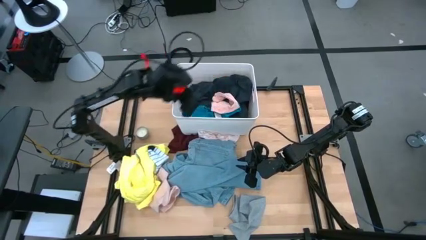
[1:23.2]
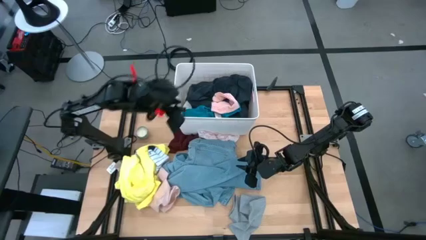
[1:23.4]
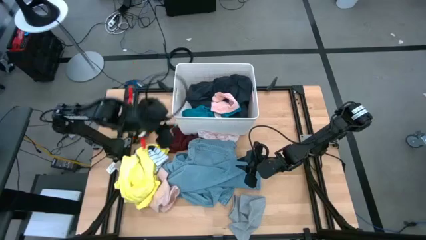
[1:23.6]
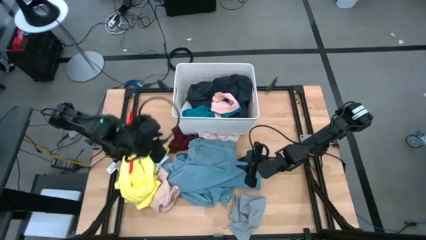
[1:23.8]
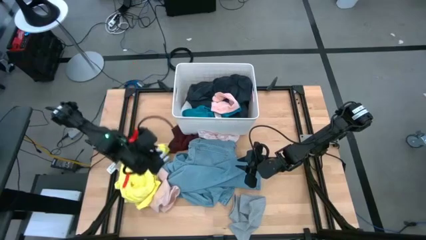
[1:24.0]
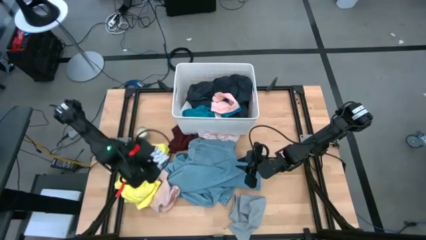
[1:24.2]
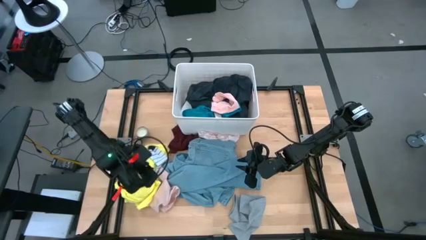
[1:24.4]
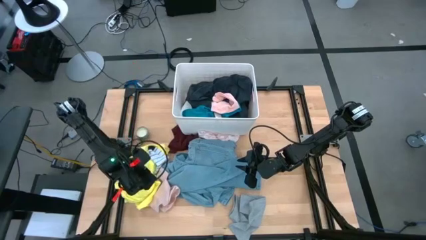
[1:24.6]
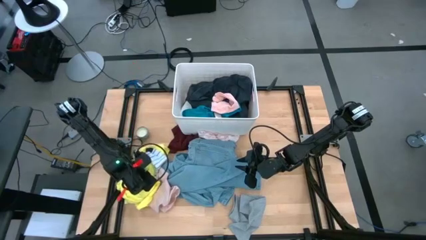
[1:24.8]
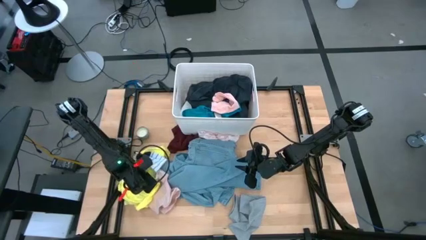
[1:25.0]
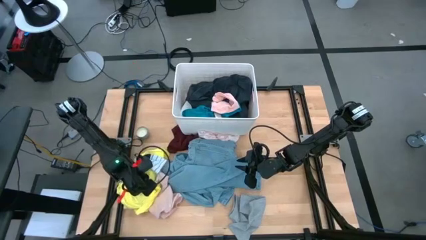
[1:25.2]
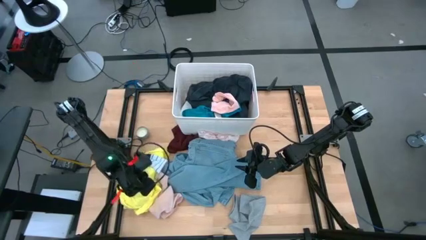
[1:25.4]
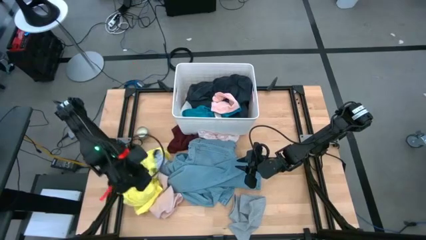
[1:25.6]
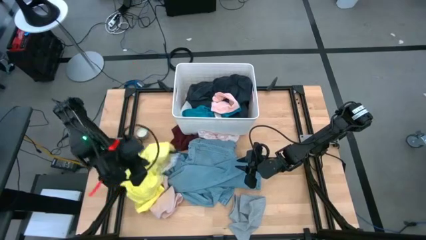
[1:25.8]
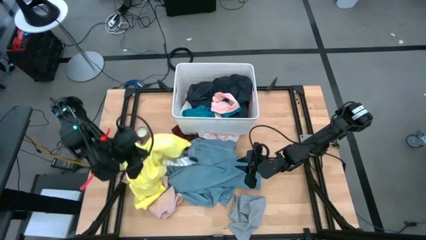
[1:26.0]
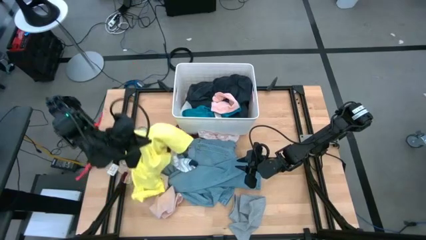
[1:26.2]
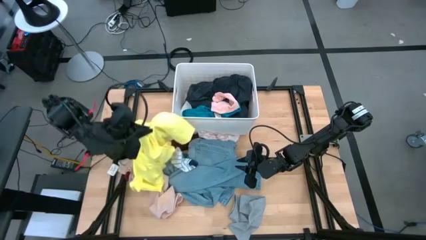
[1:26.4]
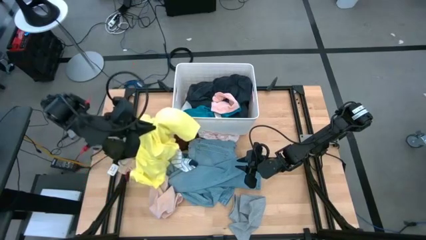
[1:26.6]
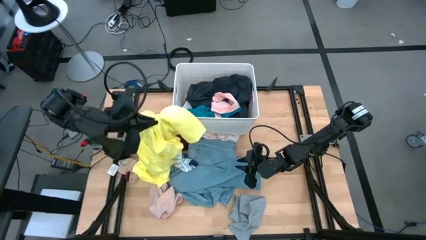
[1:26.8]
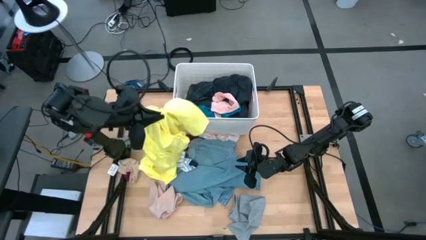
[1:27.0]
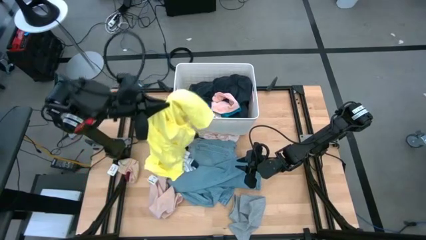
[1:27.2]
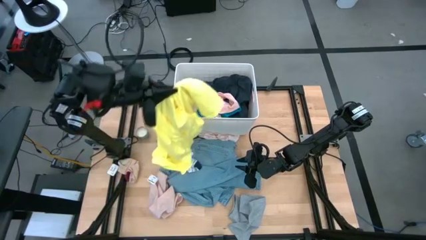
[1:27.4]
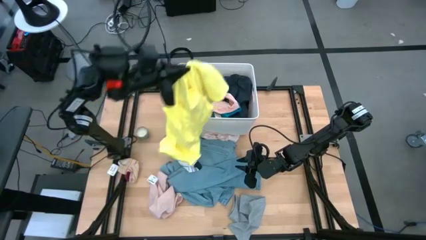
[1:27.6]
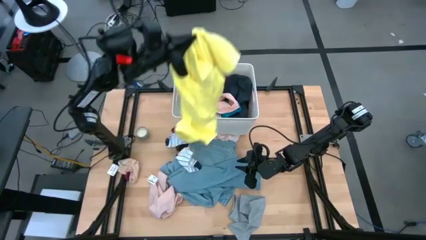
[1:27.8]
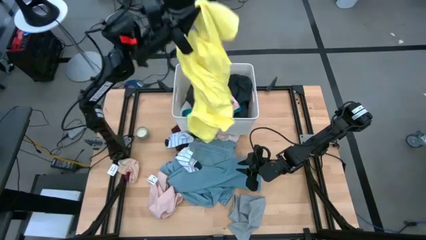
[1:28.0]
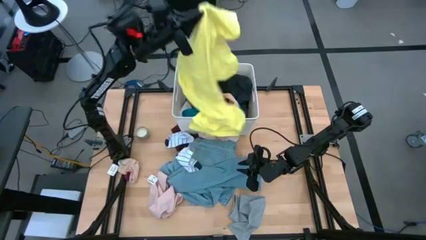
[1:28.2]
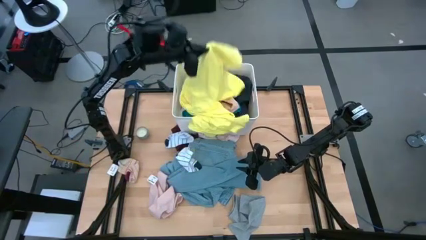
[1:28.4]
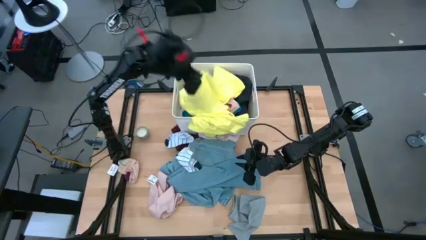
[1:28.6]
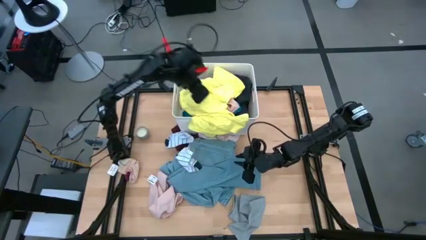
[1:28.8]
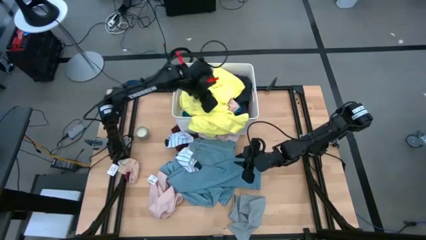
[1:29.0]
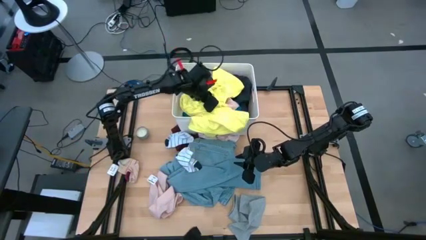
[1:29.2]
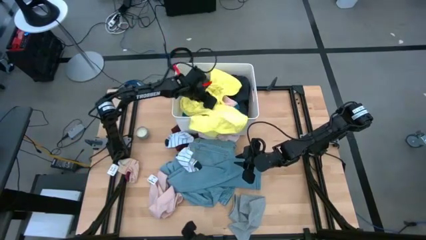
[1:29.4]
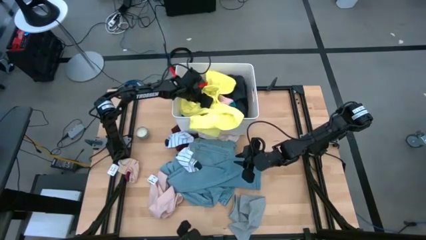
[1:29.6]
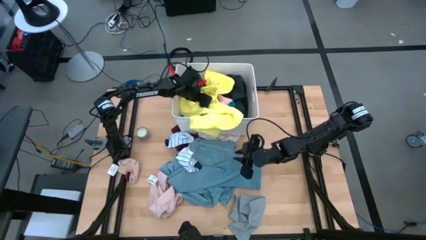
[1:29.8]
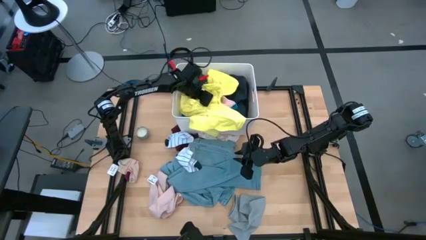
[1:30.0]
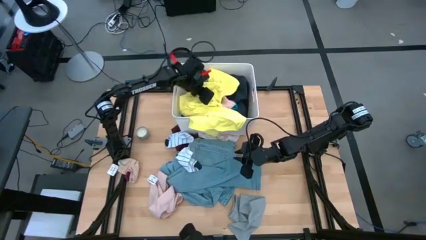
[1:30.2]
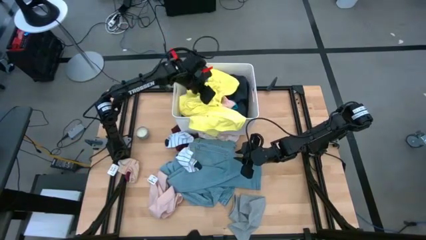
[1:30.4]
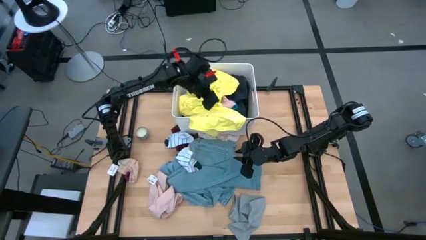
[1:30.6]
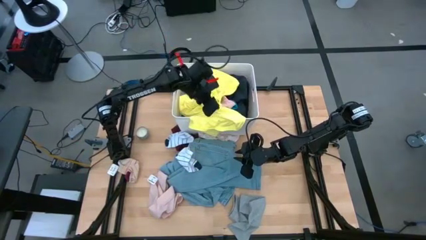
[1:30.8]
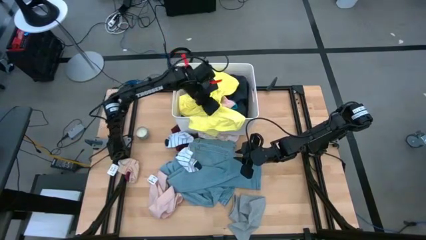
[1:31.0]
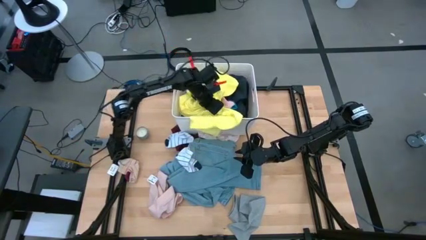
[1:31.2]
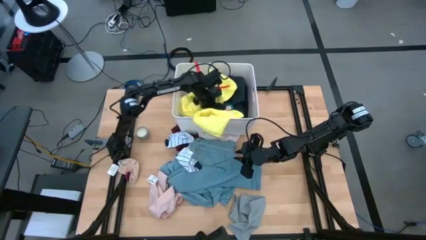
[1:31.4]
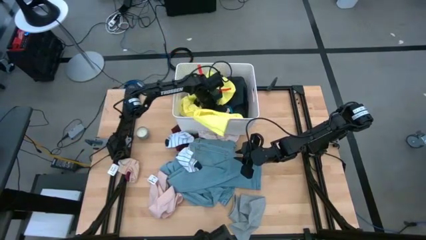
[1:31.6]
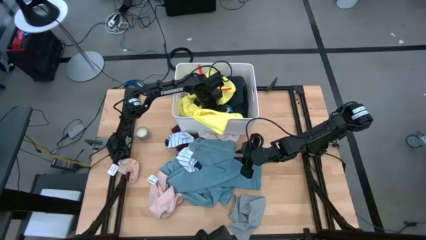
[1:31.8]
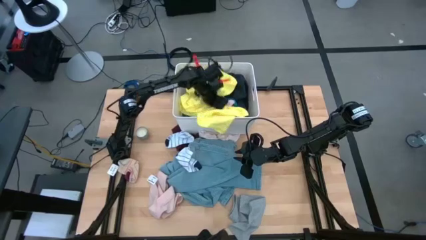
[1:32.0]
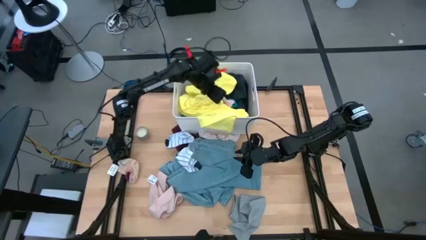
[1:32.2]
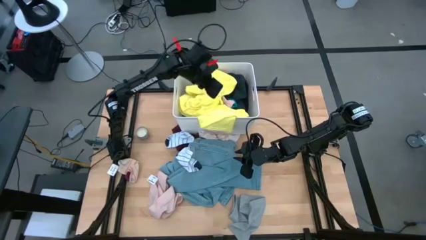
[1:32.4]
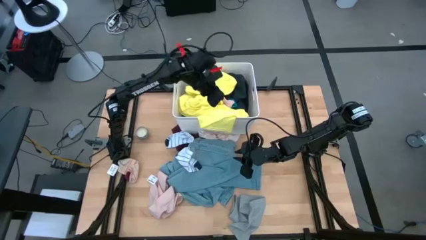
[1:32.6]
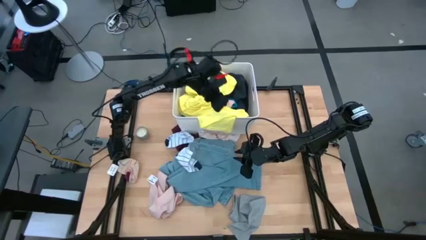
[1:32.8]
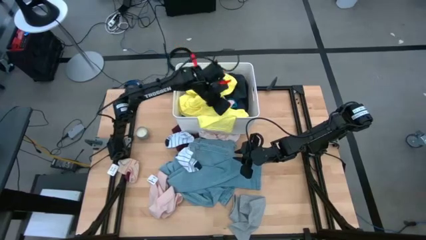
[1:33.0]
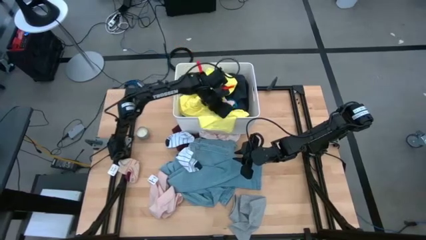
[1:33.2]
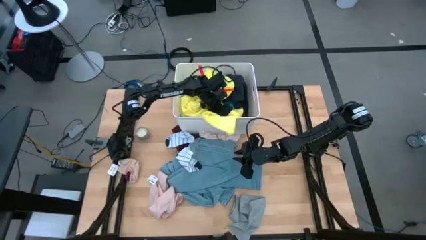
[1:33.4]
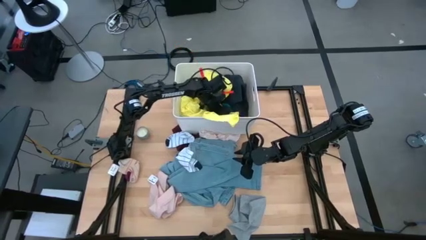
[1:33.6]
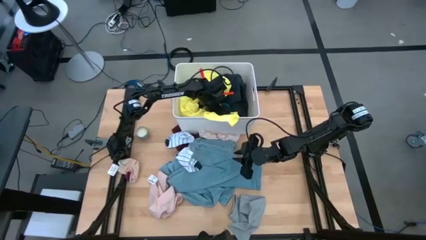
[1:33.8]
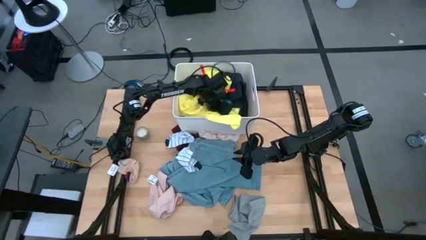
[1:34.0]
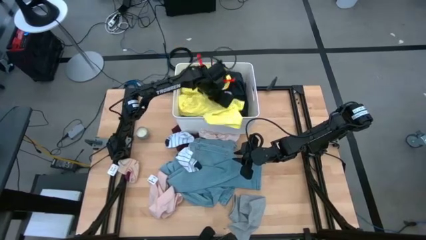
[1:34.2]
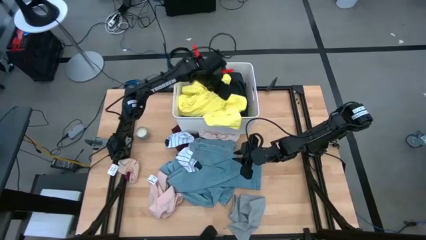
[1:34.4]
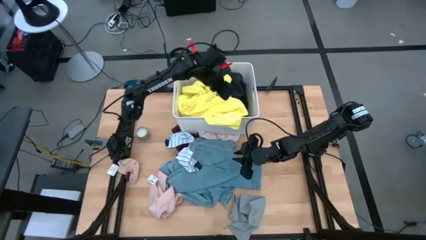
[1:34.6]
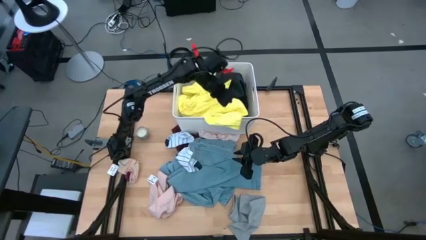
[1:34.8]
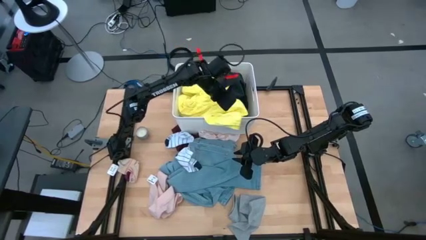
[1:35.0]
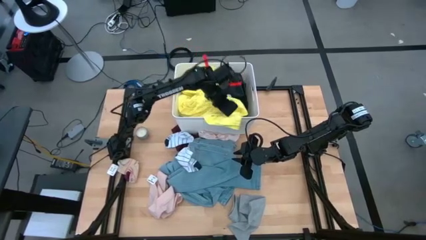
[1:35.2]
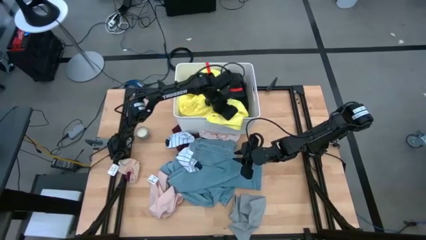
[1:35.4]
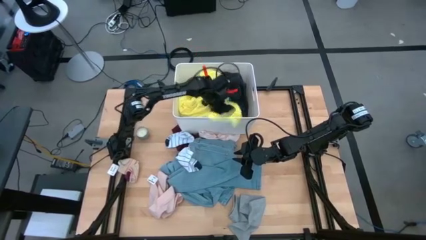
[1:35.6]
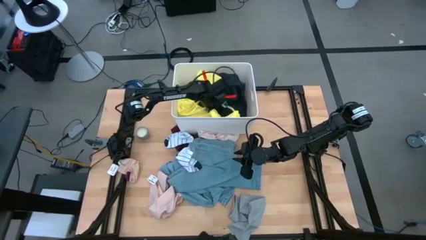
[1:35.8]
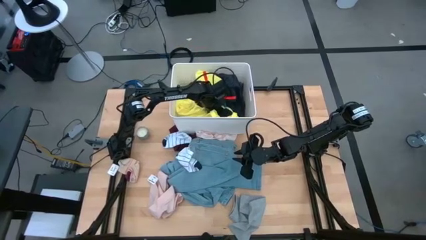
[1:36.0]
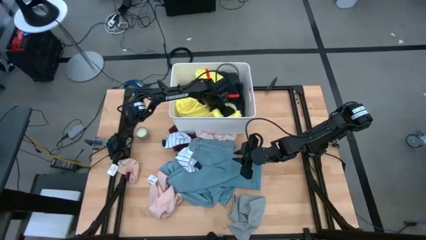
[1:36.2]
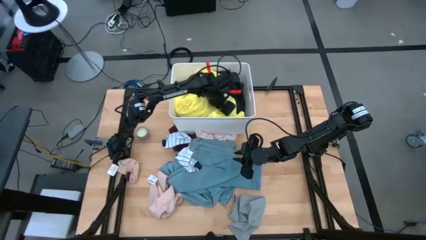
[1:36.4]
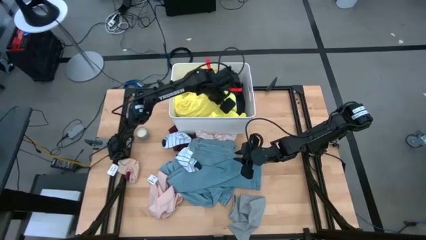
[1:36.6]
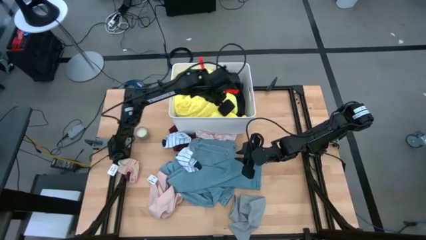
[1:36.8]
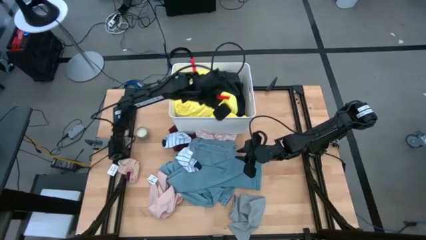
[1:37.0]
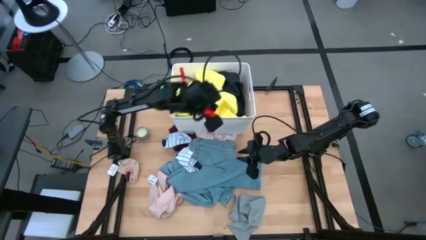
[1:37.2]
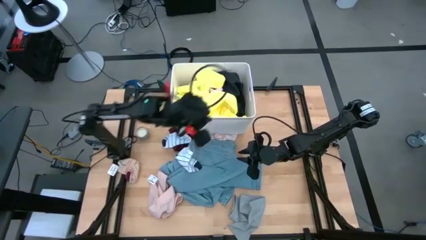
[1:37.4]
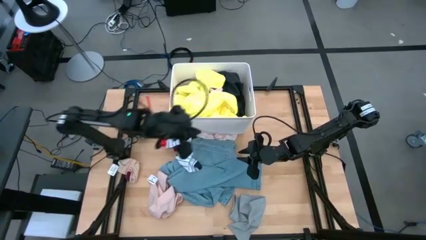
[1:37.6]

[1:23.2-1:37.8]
Task: Sort clothes
Put the yellow cloth into the white laundry bin

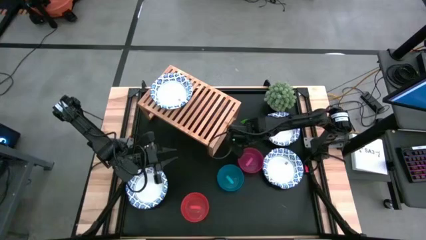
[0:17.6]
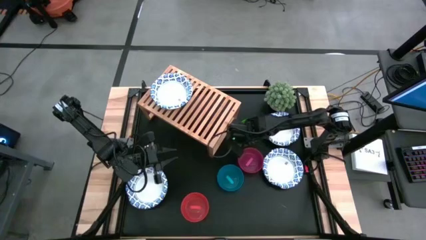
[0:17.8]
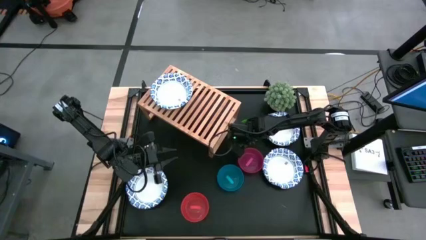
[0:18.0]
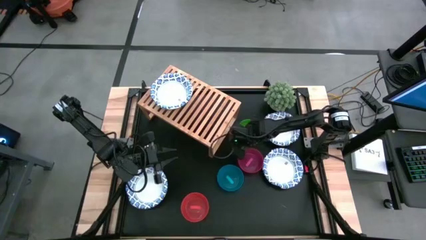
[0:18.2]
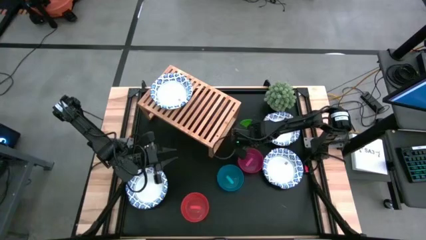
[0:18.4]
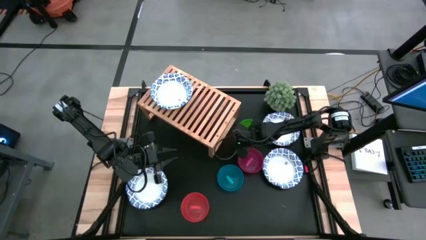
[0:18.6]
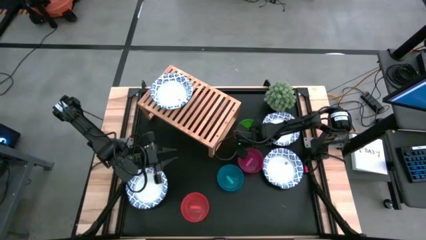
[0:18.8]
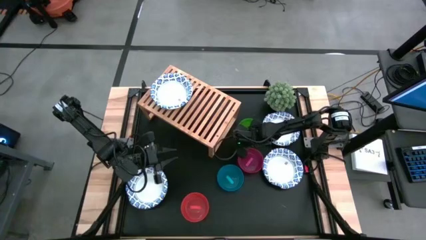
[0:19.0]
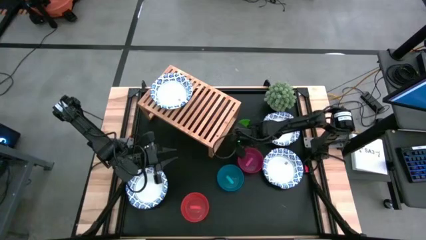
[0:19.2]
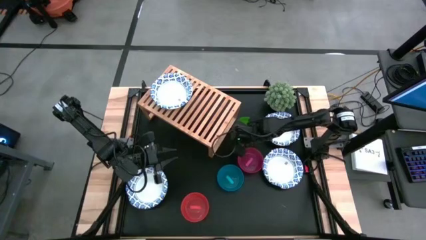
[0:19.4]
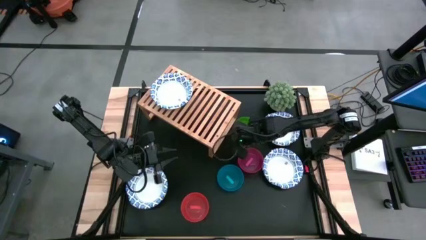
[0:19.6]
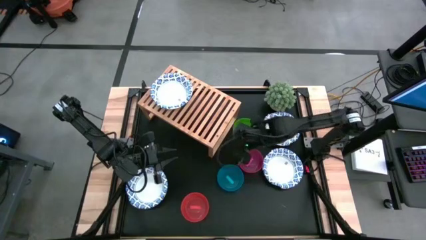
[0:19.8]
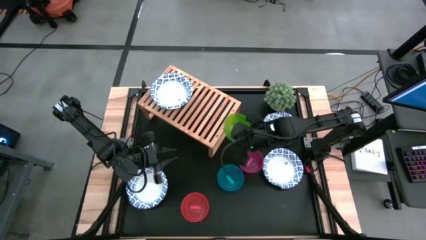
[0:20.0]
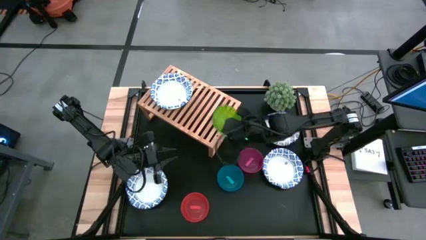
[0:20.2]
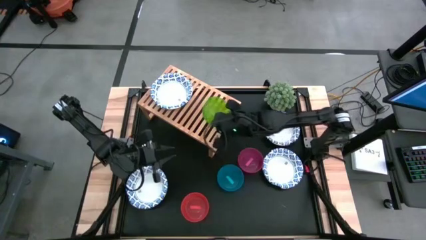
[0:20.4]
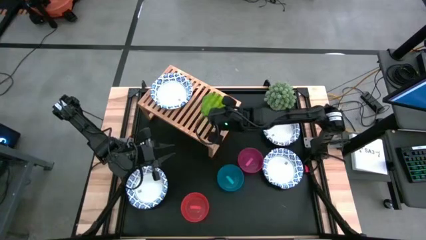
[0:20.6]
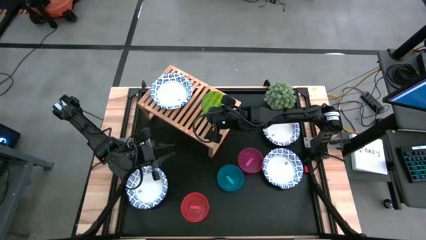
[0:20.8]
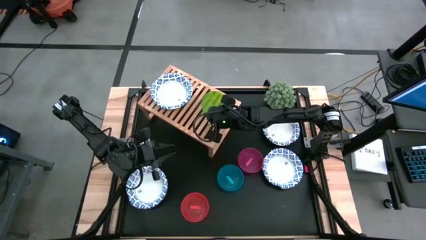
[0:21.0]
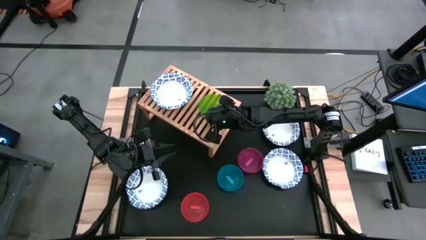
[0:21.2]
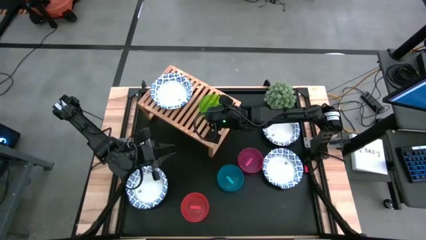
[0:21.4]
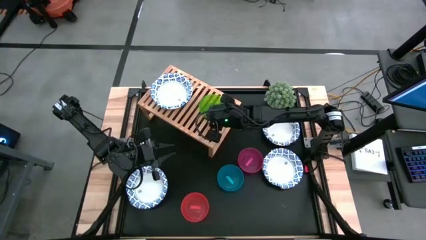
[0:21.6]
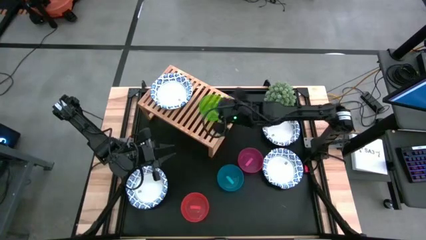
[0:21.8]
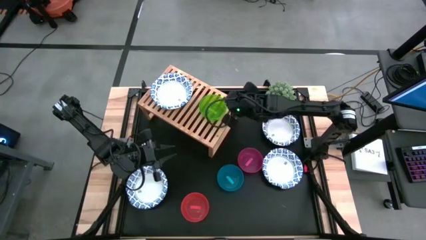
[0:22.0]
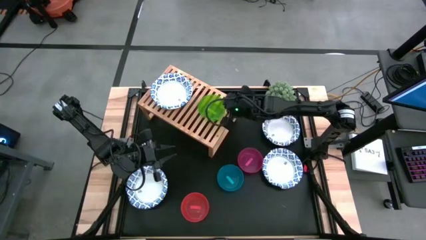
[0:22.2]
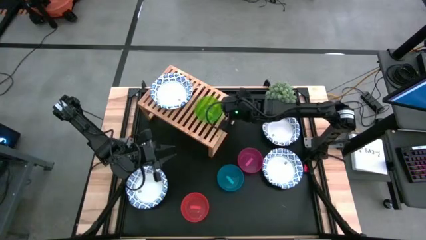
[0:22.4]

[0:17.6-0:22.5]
Task: Place and stack bowls onto a shelf
Put the green bowl on the shelf
